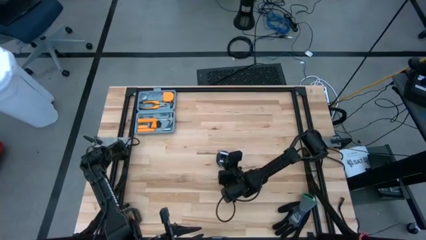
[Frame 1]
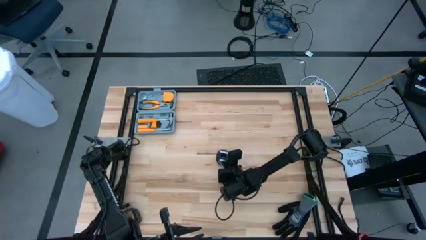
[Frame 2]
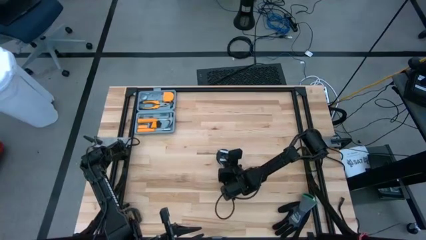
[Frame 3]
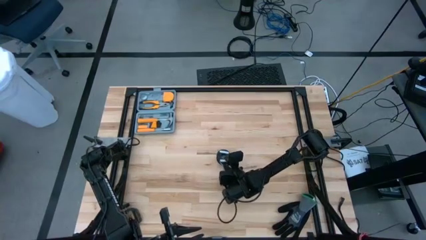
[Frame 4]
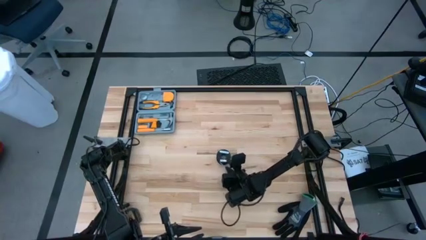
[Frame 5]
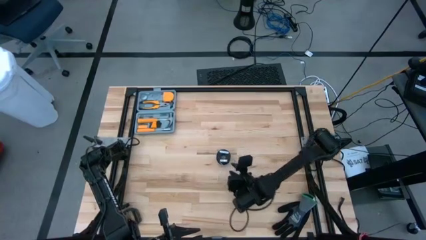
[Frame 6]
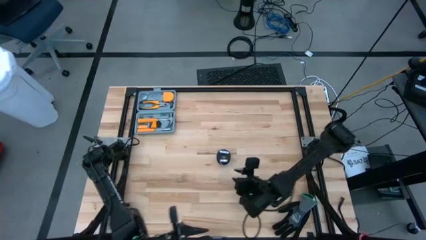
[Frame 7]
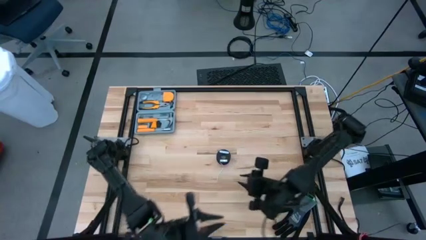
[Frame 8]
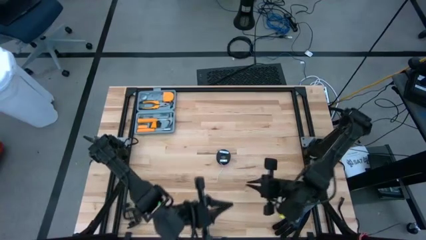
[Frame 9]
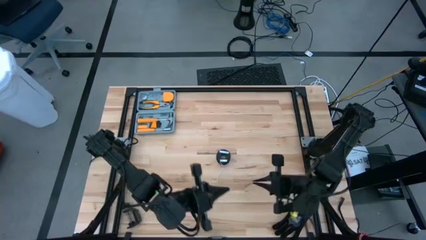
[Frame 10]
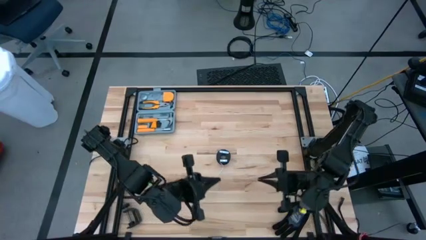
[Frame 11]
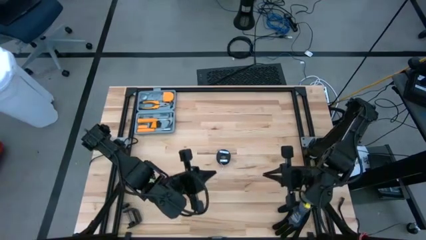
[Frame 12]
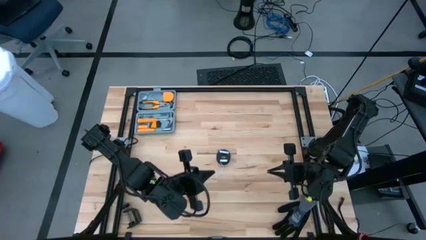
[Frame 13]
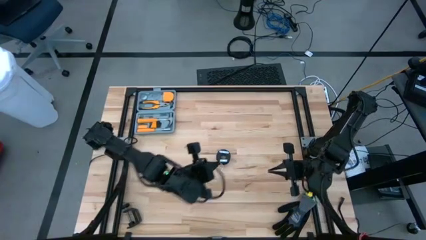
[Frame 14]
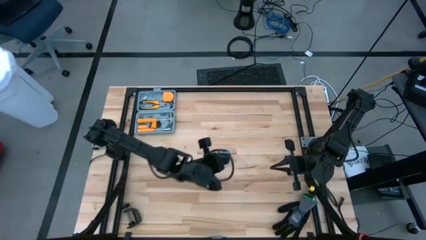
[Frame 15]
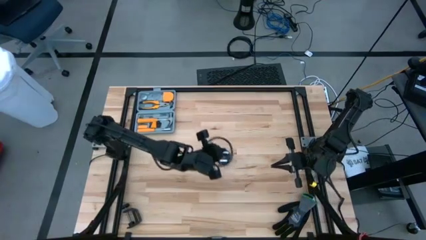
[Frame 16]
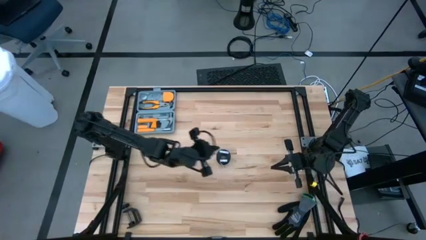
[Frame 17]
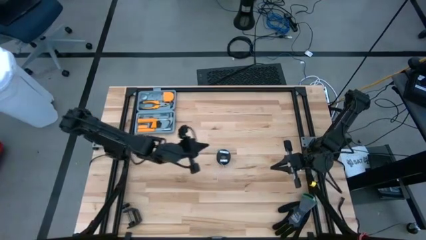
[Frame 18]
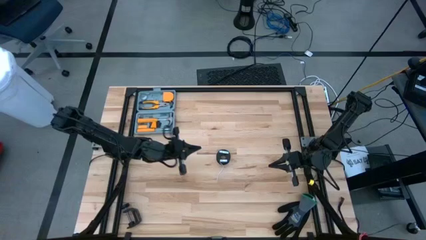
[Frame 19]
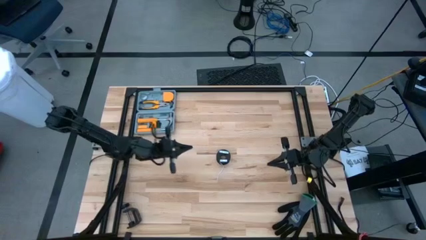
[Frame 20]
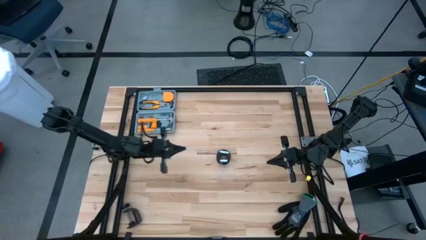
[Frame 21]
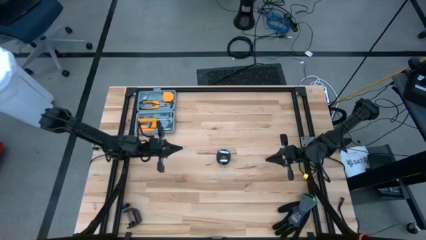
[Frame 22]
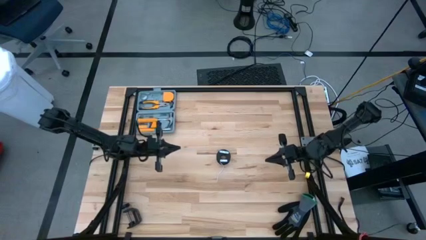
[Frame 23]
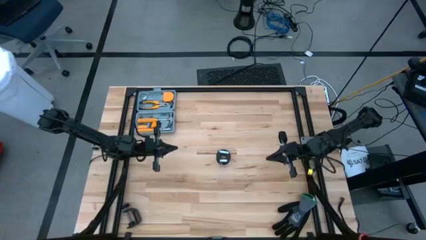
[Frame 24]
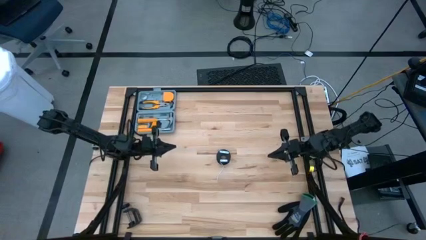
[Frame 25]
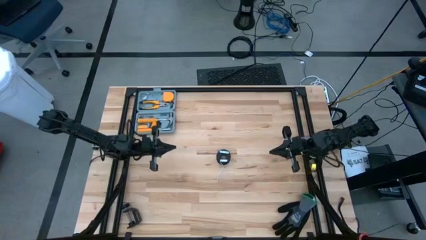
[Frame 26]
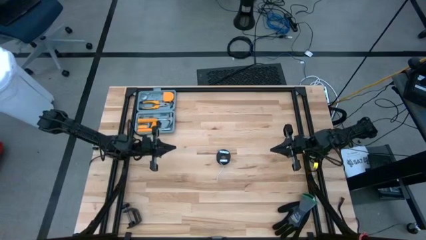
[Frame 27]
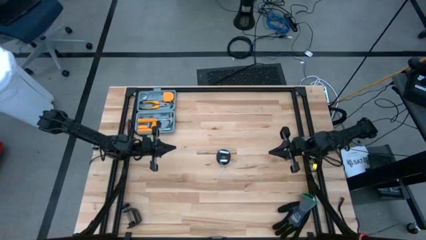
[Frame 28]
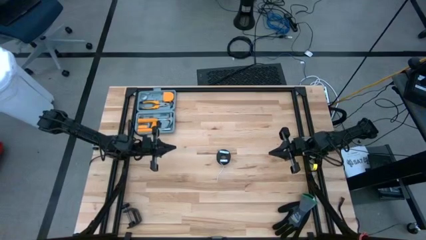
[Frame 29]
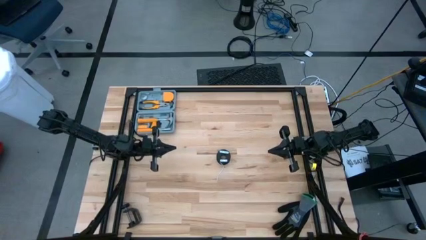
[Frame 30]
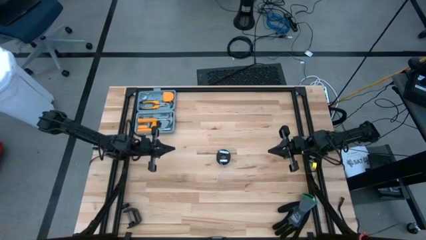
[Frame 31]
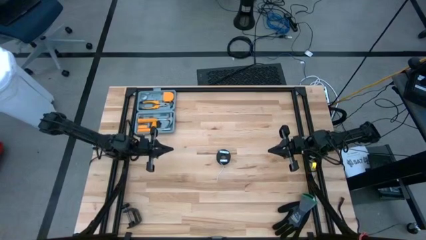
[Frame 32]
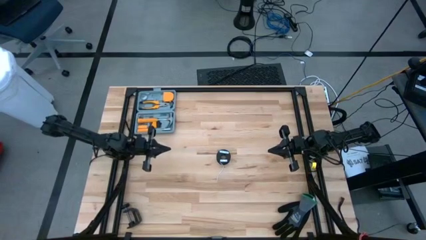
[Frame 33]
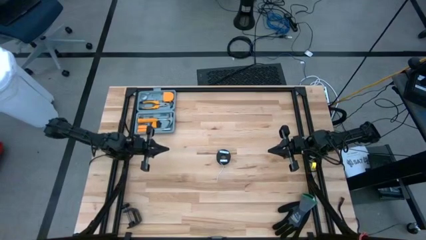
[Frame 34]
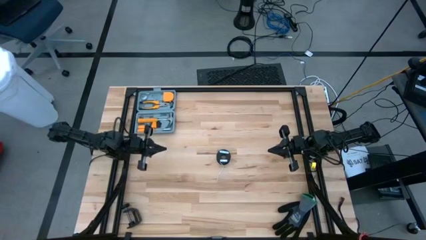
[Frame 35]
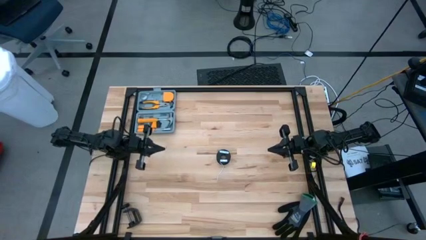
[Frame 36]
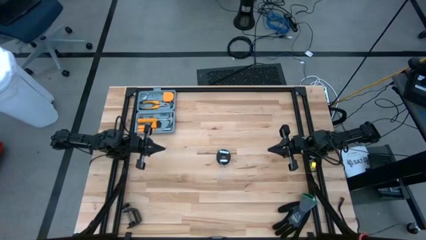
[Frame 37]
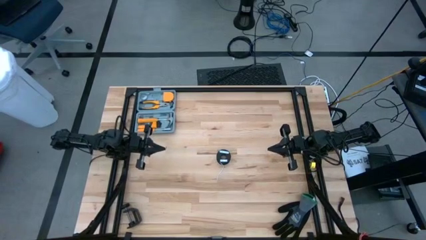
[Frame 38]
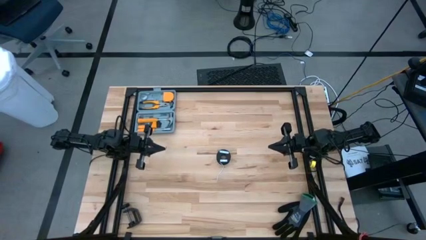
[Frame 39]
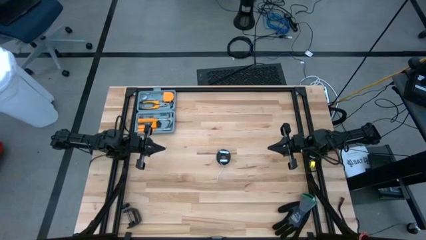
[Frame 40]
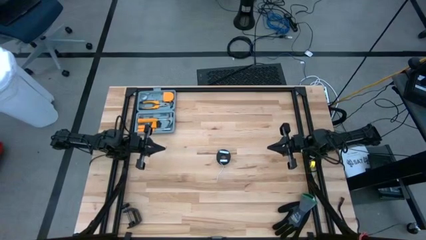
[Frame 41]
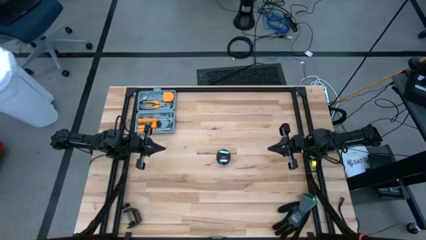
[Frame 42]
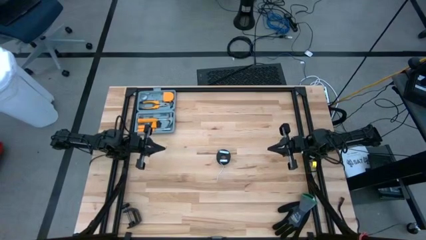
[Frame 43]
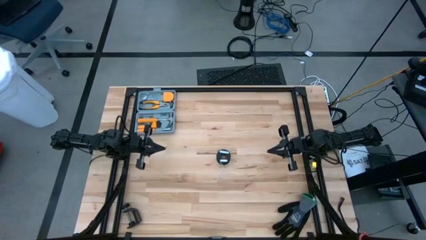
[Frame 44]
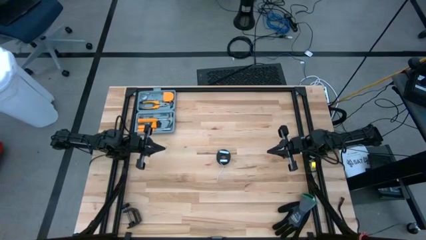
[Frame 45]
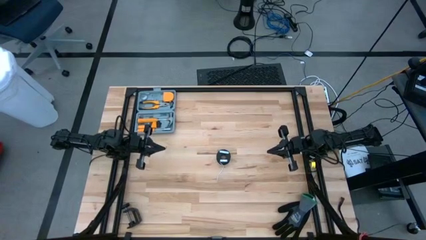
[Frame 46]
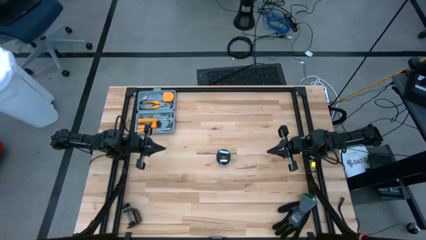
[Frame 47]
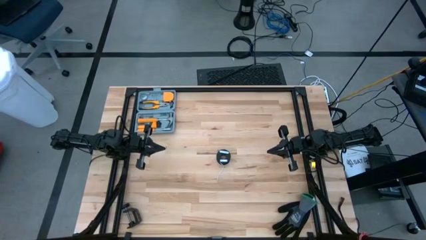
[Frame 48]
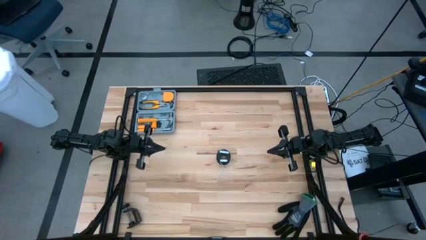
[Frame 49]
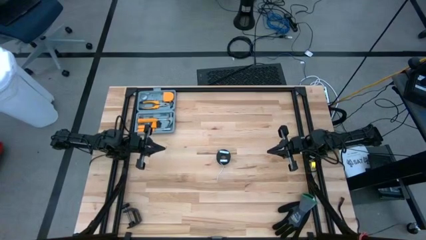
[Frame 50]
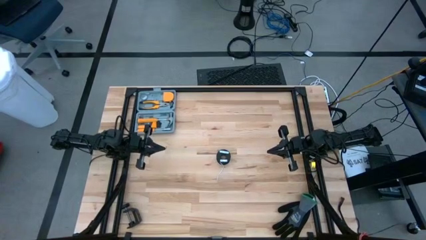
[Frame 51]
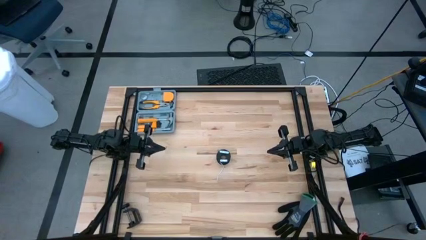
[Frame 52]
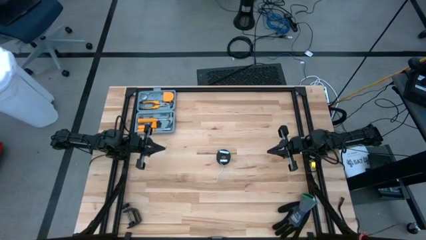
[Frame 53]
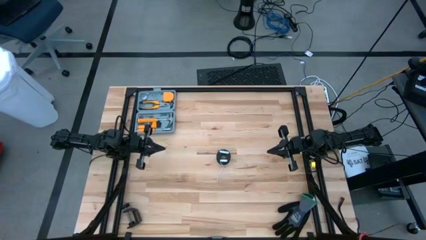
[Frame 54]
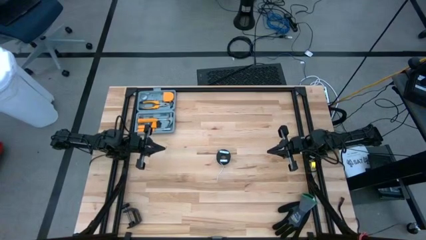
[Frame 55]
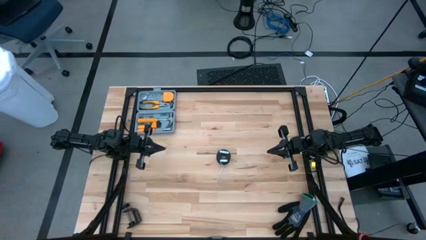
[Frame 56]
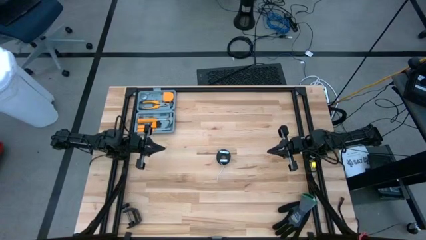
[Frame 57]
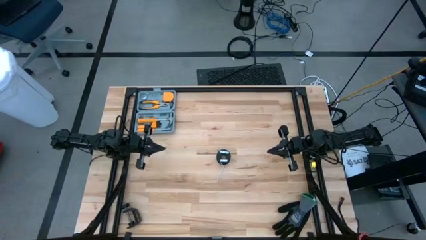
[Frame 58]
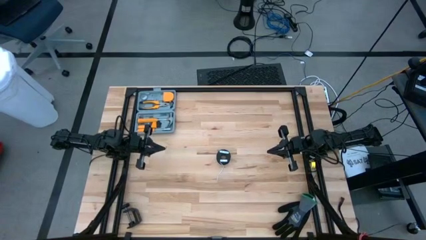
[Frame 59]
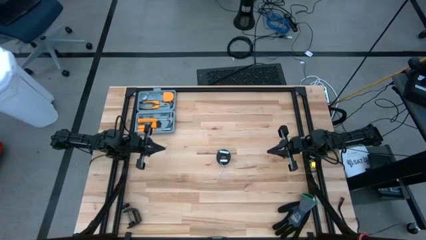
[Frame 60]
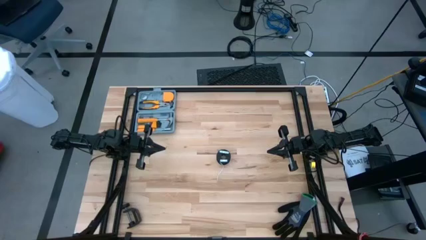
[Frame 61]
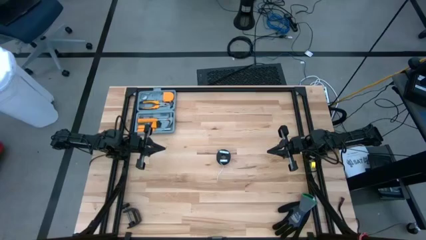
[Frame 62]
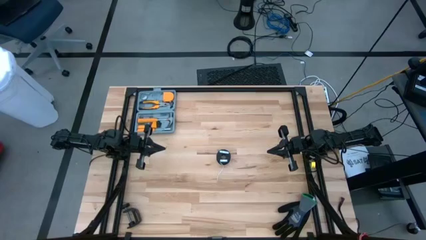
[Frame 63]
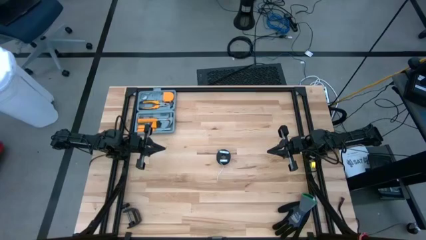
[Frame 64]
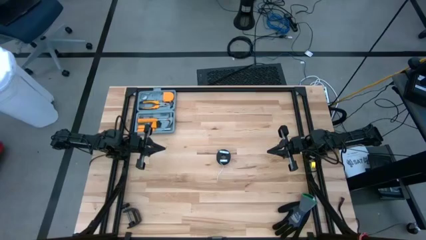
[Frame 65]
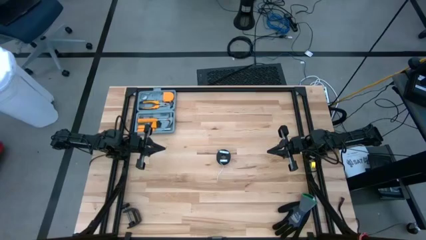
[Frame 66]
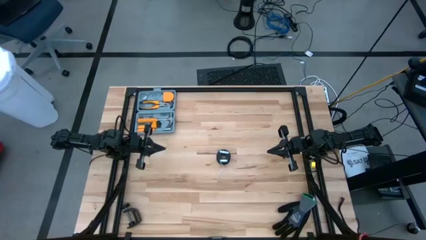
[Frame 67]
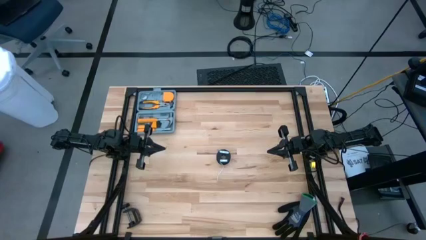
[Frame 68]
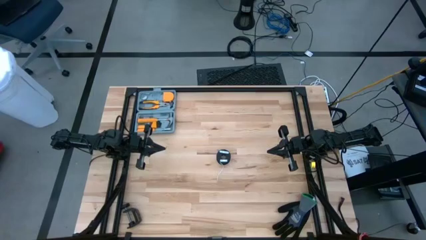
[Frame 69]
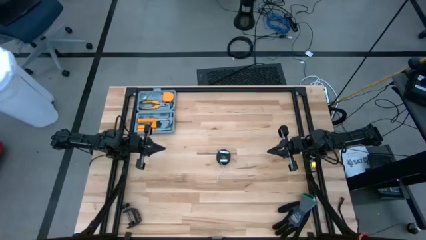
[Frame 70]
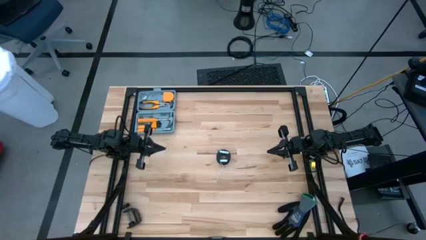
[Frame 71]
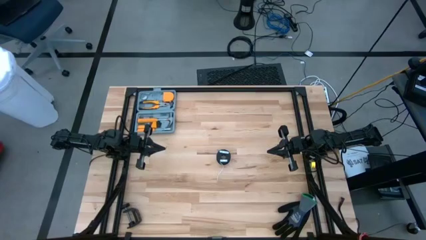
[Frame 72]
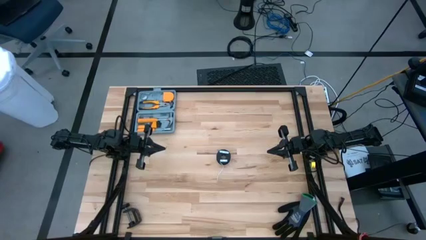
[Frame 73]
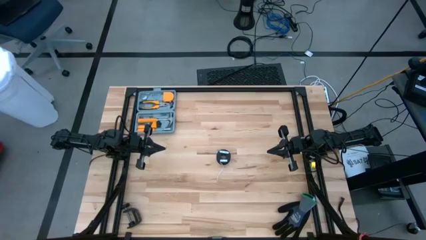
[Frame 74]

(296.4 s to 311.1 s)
Task: Coil cords
Return to Home Position
